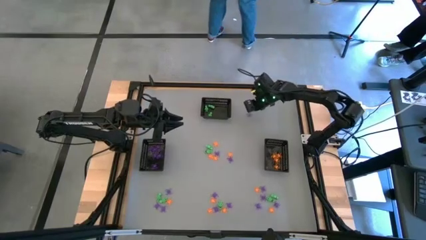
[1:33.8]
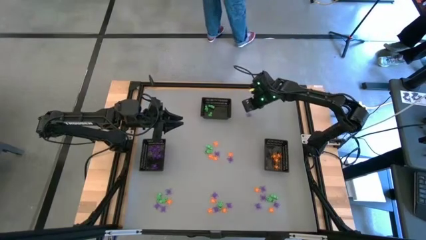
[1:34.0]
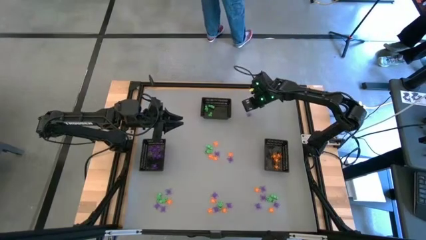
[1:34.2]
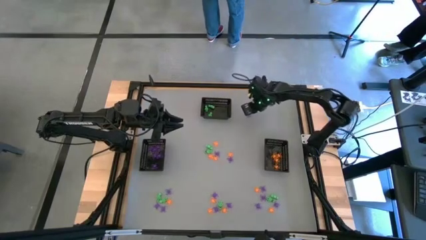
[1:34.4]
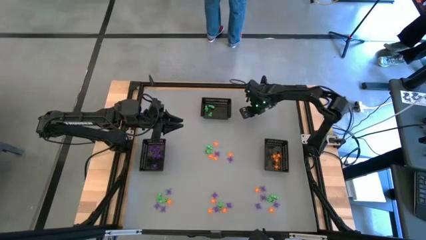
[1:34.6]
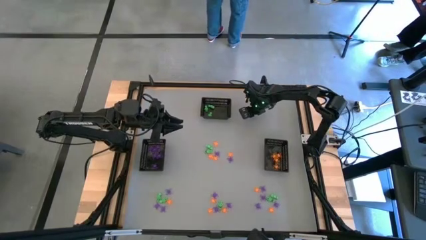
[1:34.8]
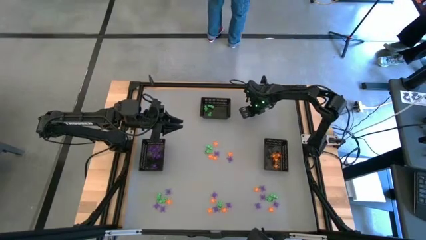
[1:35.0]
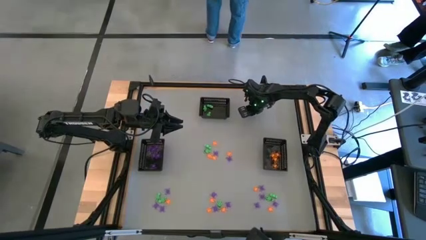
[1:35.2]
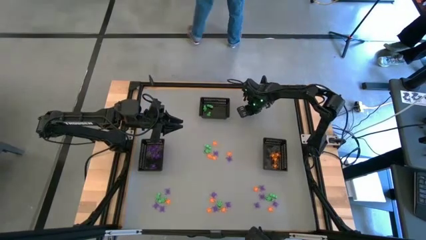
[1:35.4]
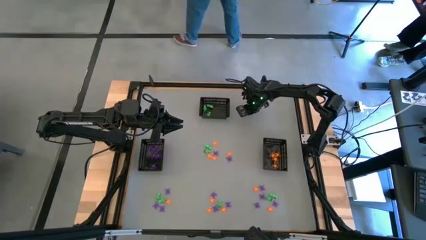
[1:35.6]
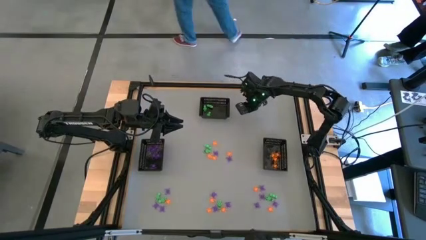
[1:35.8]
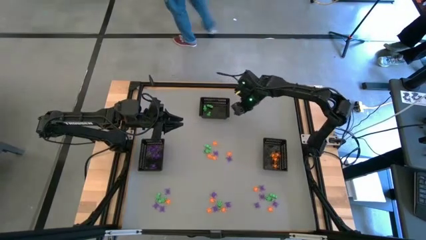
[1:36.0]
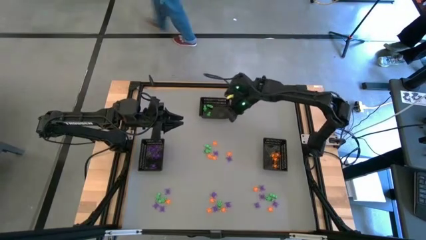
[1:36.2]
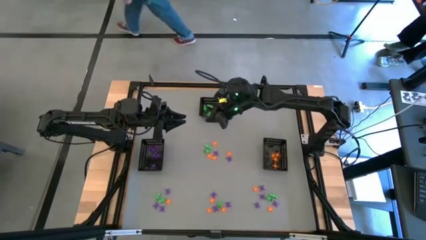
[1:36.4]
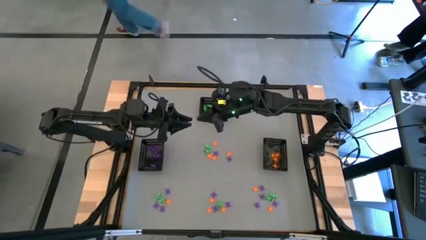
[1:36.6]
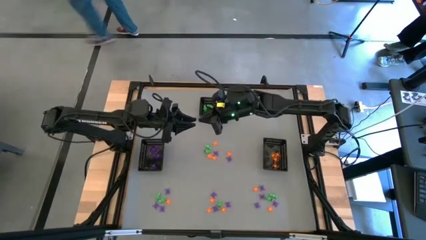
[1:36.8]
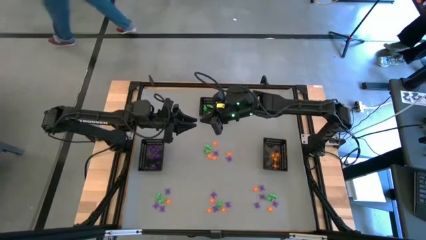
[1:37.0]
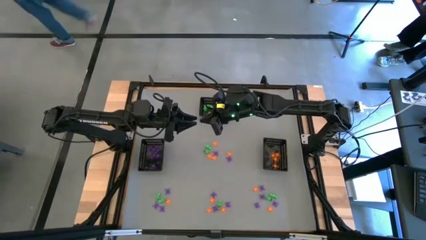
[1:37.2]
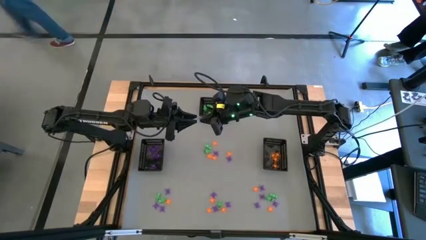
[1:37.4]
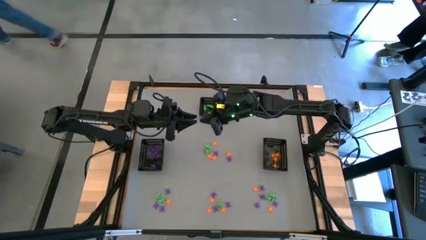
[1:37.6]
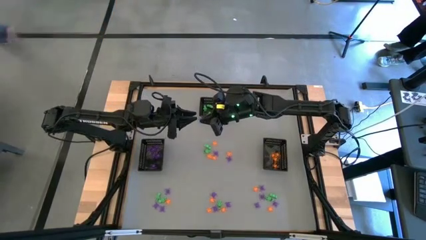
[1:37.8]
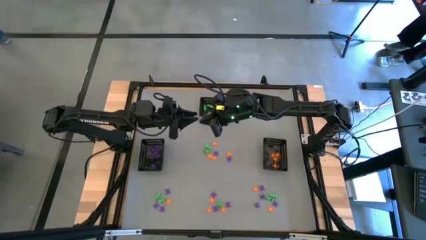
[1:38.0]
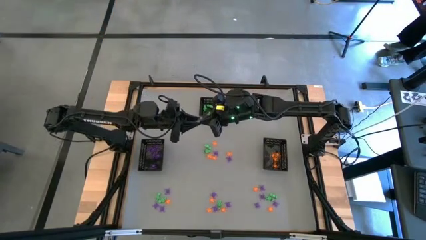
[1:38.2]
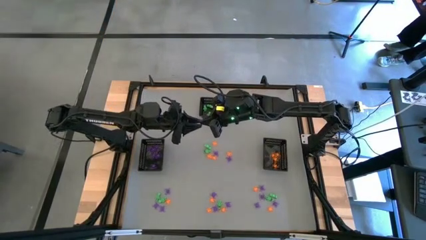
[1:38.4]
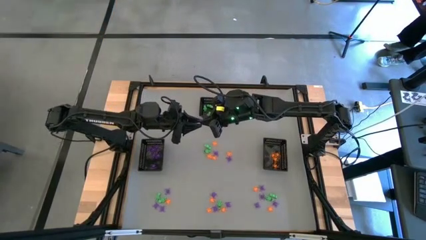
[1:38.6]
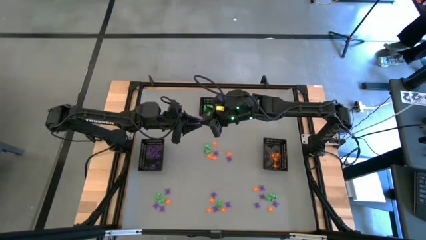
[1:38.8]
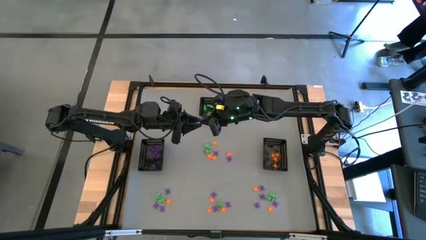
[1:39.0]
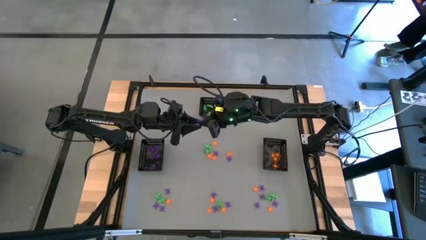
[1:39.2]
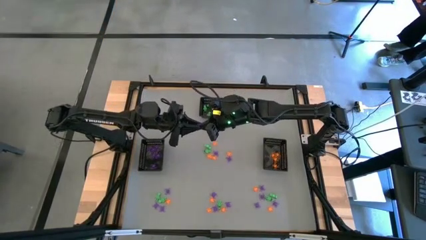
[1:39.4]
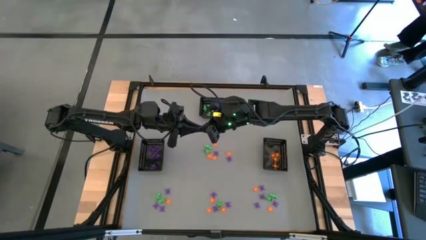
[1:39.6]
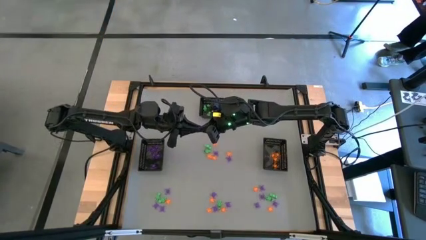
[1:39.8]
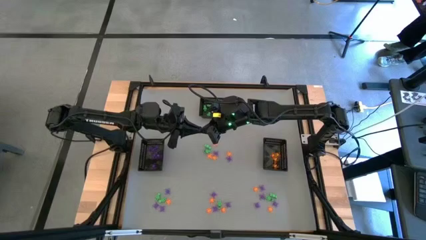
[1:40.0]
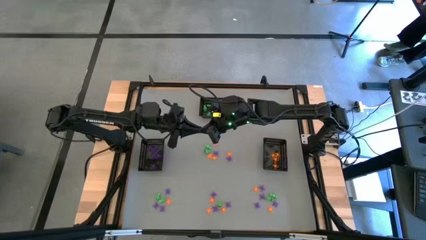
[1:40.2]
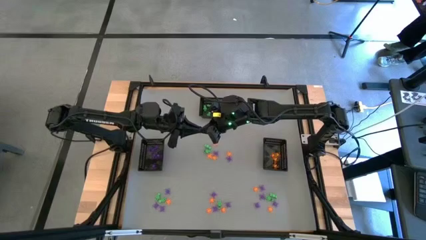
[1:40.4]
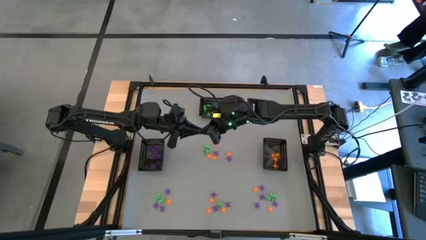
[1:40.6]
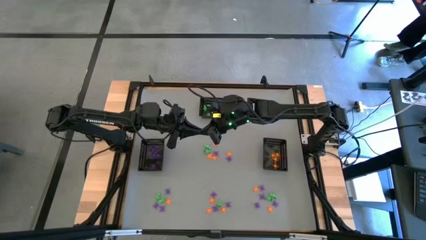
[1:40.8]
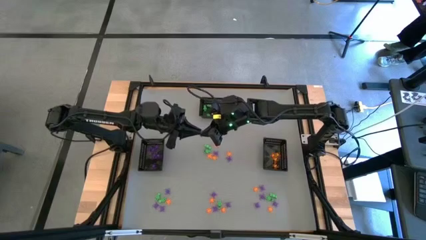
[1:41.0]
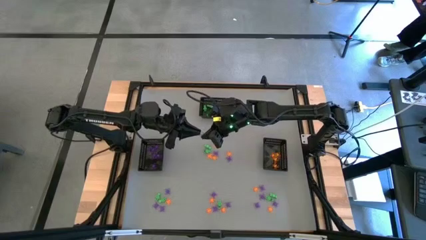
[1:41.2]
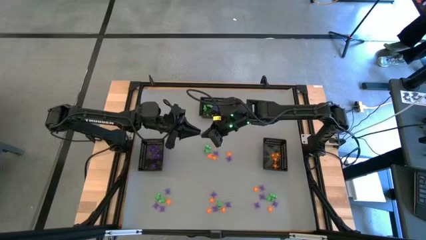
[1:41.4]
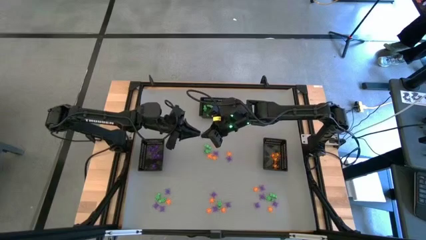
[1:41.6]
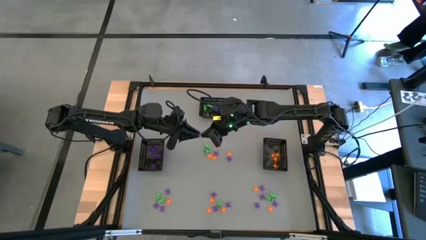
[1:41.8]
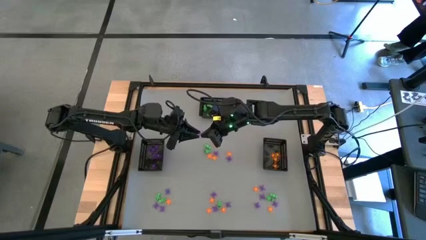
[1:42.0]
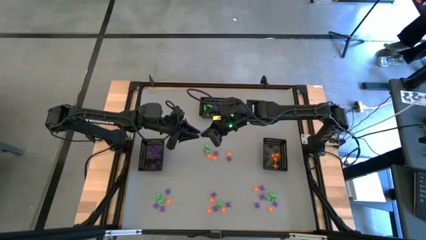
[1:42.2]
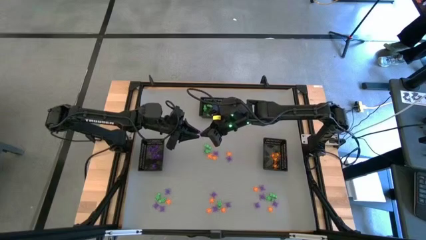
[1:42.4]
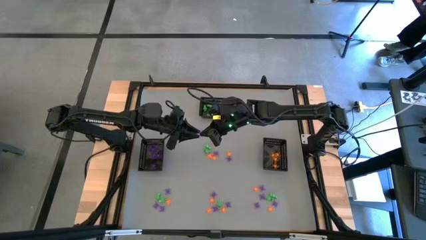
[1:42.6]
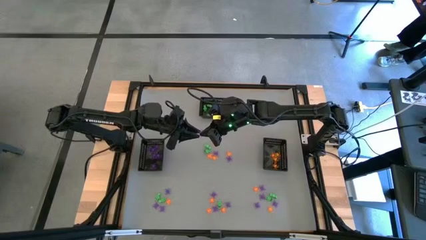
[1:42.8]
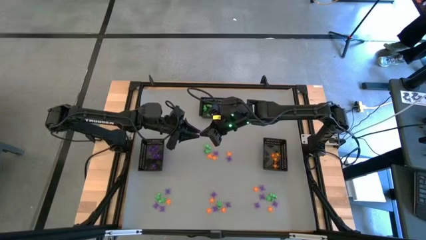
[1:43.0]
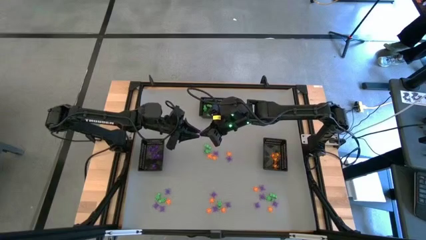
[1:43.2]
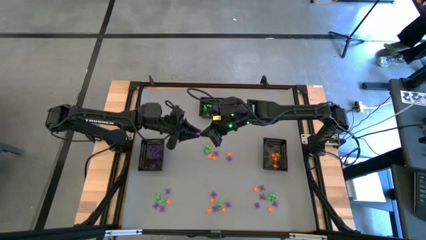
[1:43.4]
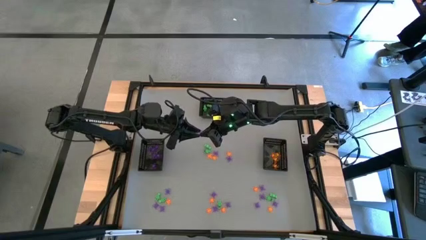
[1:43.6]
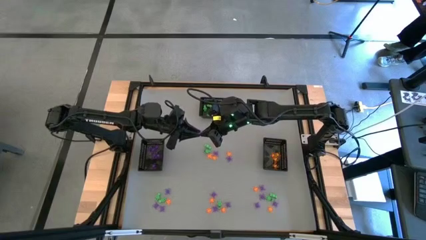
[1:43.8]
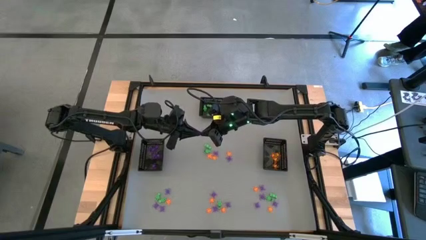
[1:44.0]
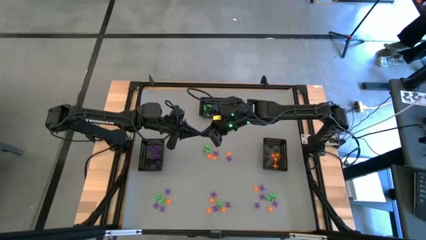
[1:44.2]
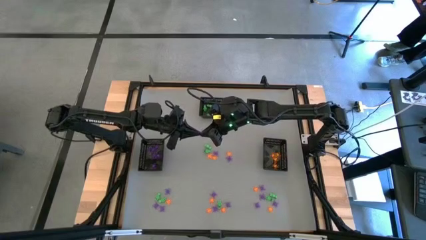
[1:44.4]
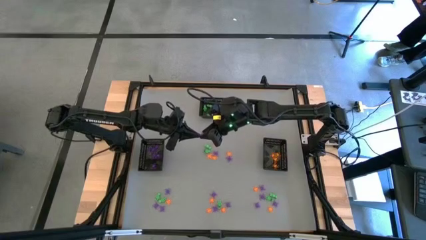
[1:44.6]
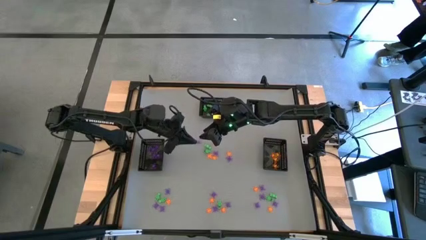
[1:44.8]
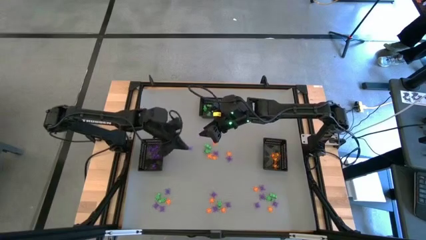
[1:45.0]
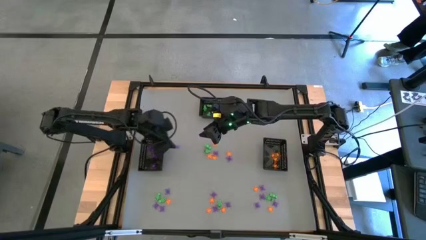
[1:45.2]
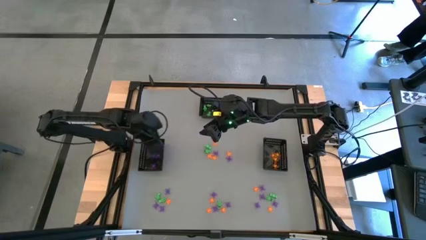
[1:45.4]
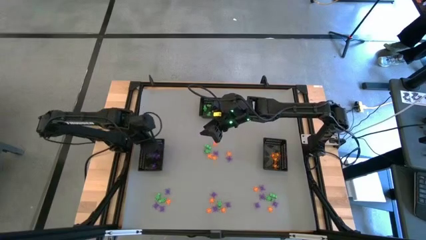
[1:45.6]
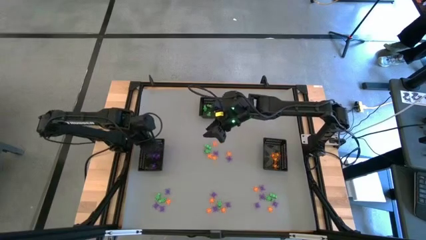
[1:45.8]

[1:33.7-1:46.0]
Task: Sort Halloween decoration
Put the violet spider toy into the left bin

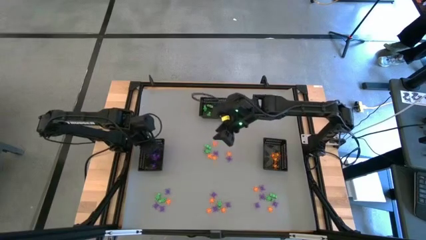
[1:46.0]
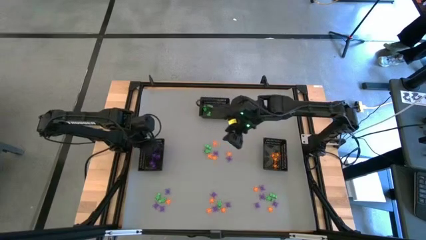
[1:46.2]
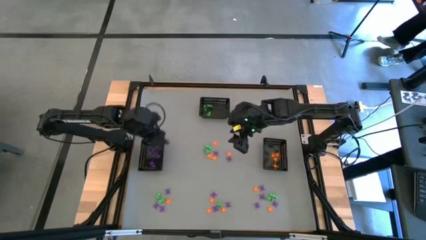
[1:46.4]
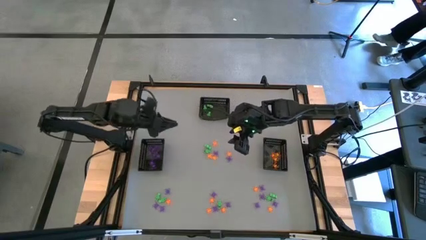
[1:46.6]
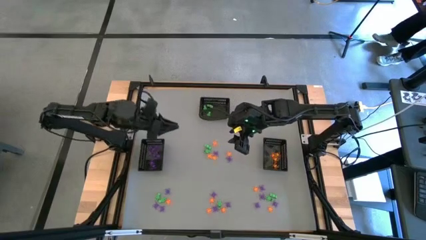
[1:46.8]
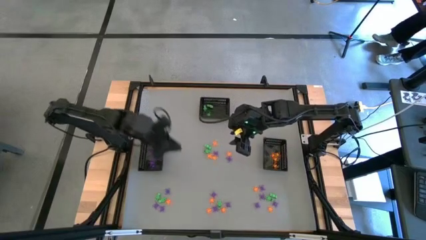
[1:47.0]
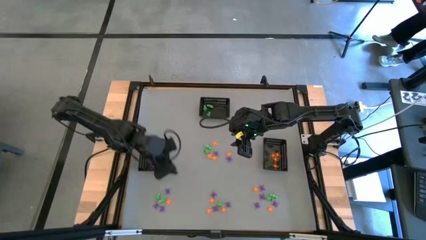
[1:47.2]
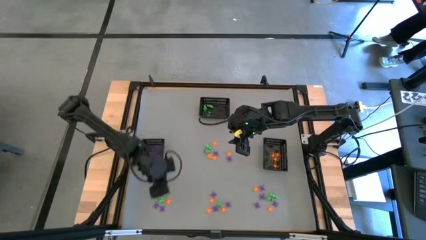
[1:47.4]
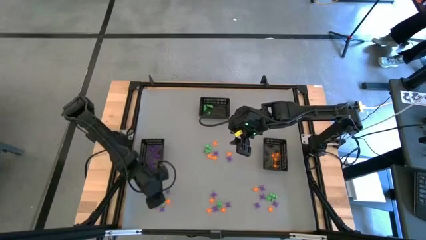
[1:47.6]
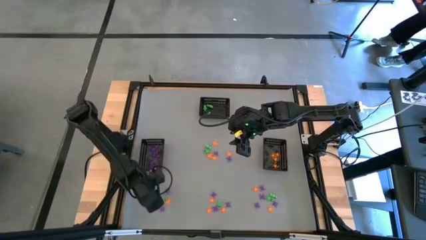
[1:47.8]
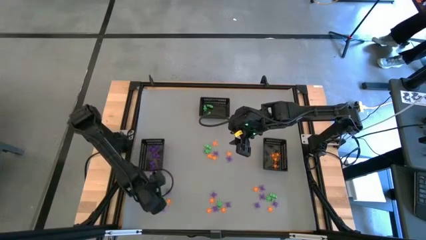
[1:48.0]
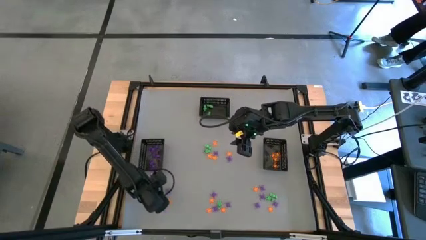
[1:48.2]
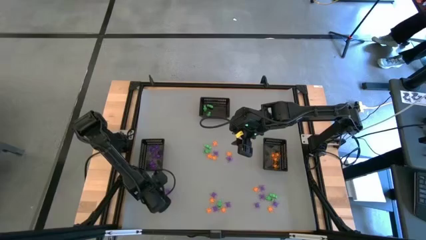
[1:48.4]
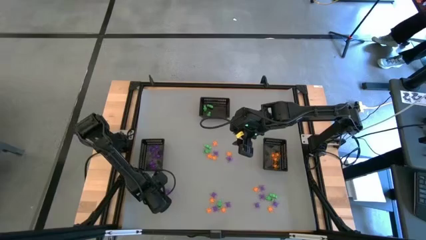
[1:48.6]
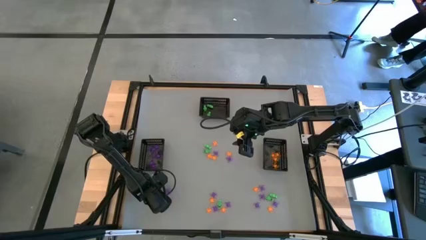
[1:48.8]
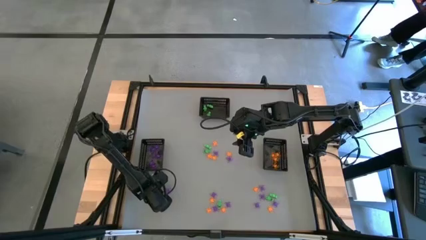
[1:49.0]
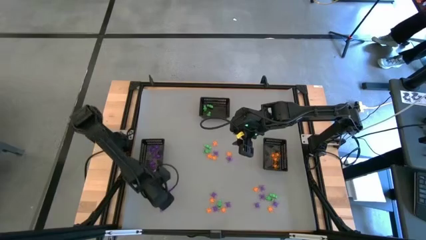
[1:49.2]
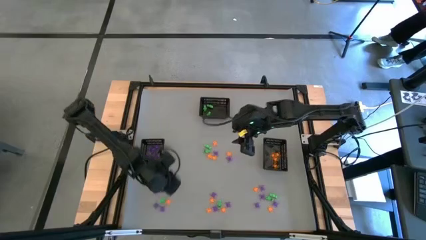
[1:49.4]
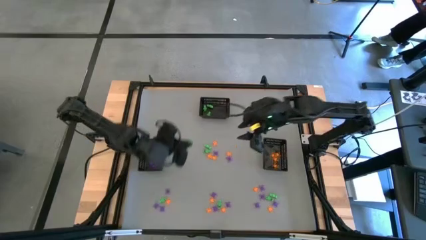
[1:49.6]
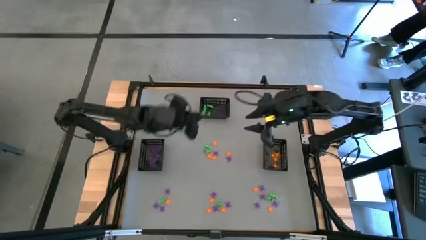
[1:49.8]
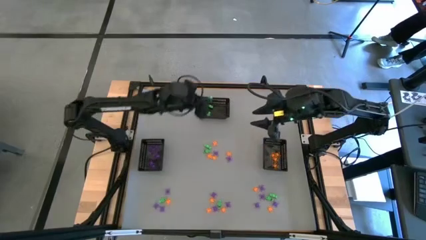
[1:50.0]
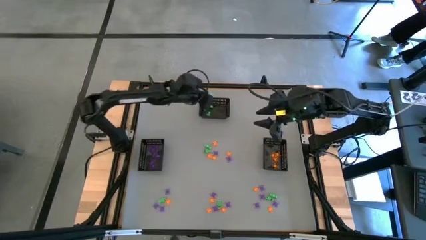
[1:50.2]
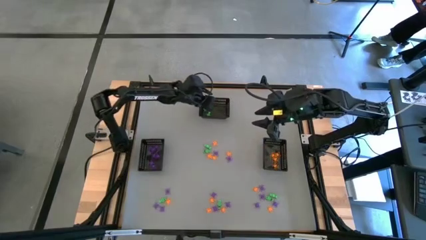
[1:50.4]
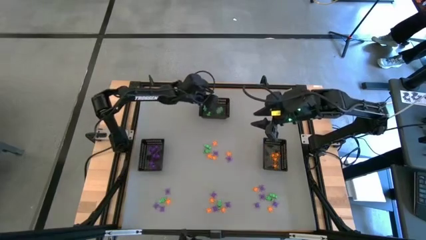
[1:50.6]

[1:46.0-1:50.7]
Put the green skeleton toy into the top bin
